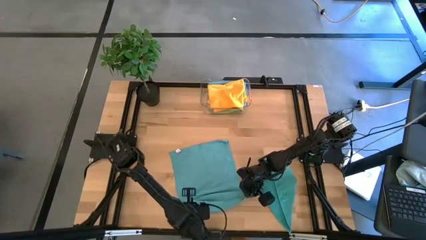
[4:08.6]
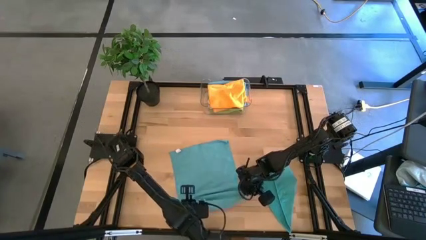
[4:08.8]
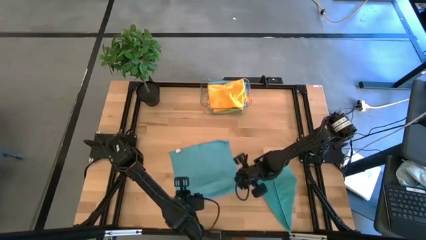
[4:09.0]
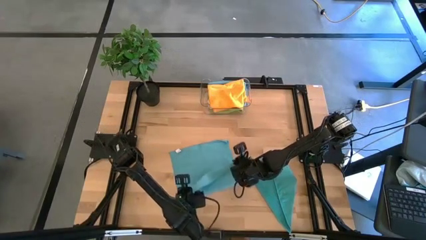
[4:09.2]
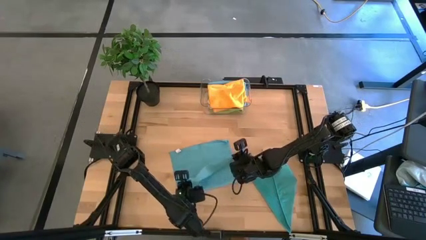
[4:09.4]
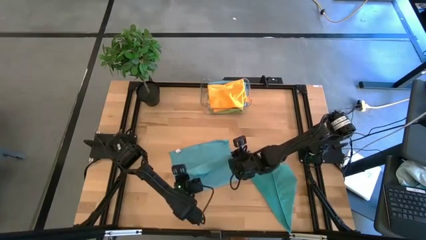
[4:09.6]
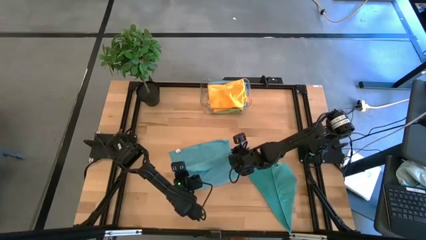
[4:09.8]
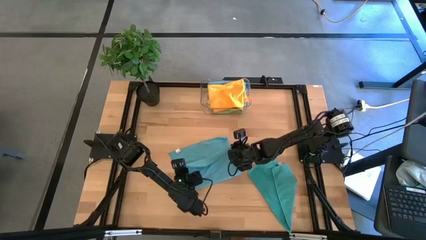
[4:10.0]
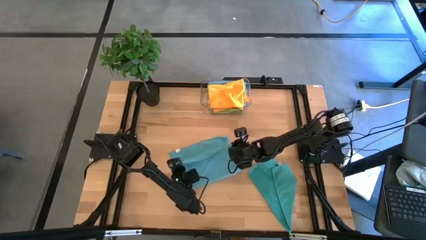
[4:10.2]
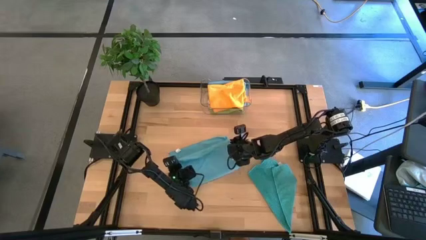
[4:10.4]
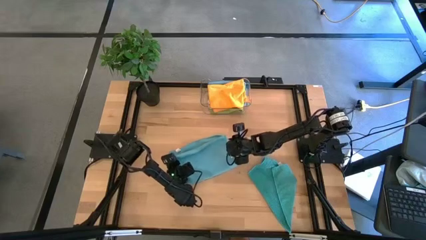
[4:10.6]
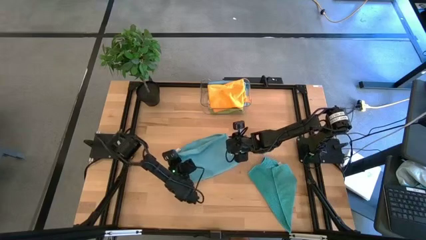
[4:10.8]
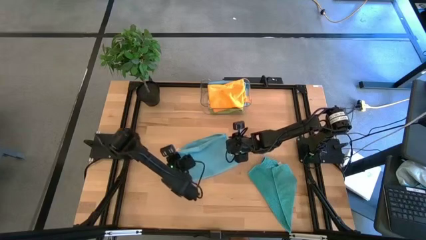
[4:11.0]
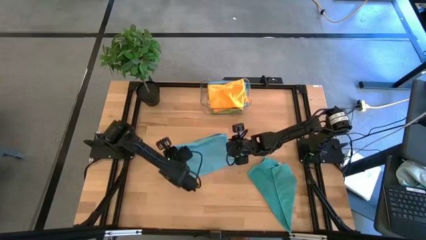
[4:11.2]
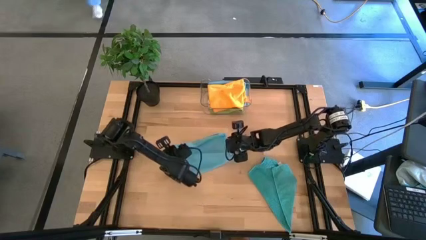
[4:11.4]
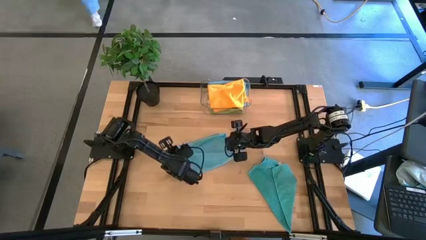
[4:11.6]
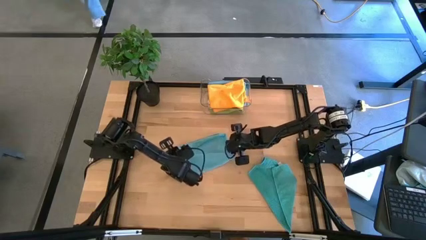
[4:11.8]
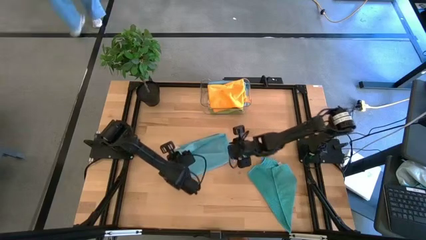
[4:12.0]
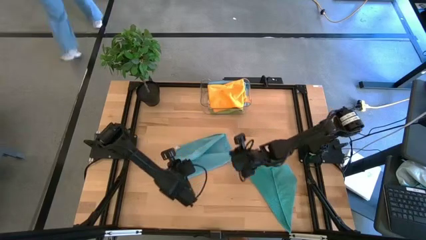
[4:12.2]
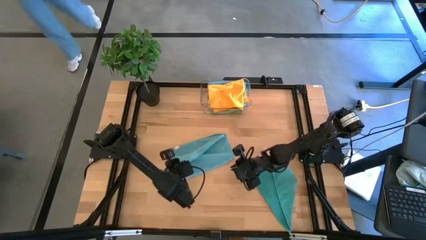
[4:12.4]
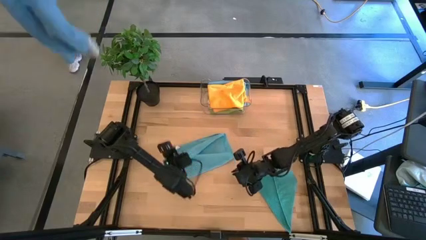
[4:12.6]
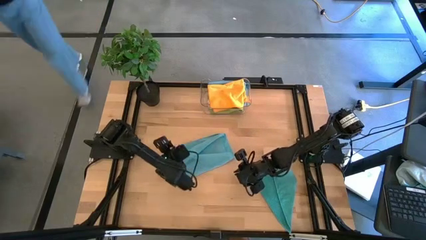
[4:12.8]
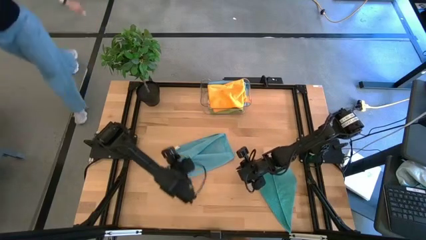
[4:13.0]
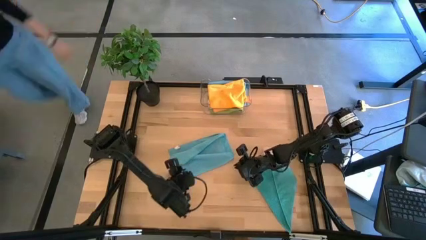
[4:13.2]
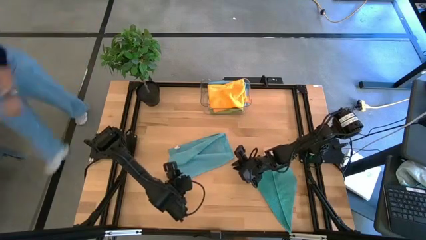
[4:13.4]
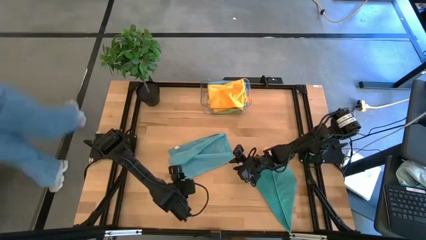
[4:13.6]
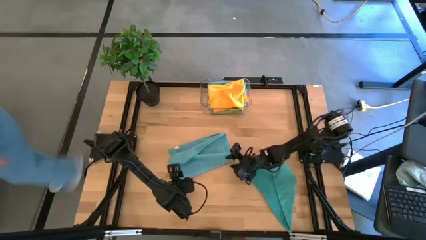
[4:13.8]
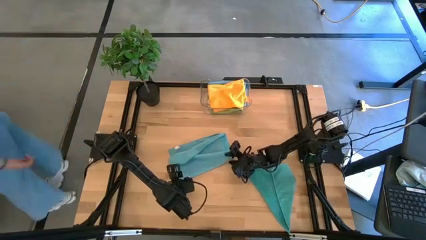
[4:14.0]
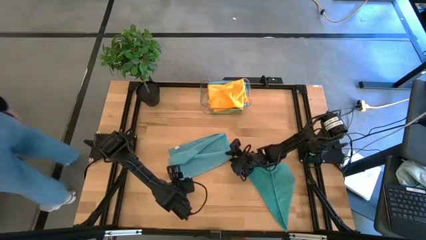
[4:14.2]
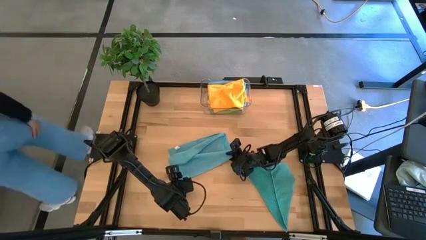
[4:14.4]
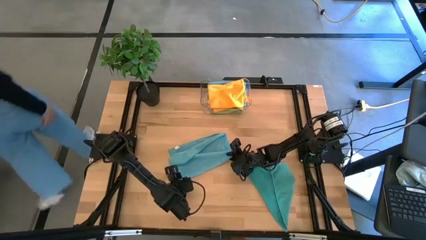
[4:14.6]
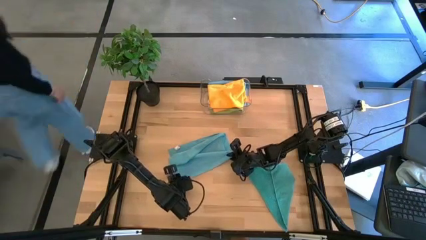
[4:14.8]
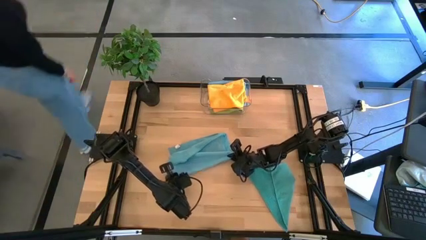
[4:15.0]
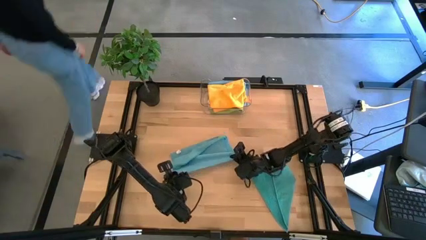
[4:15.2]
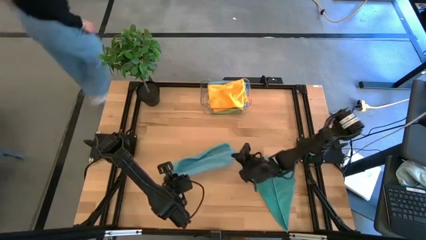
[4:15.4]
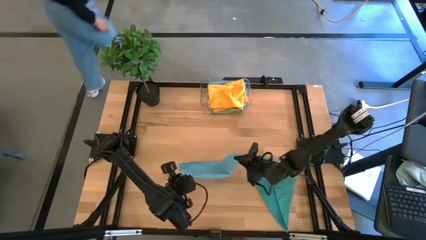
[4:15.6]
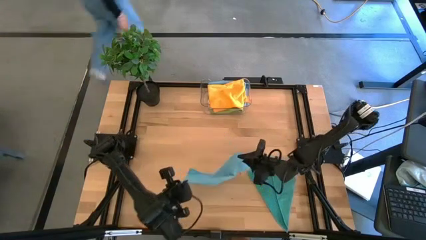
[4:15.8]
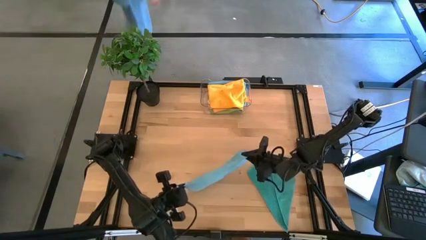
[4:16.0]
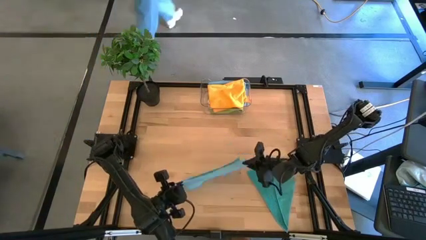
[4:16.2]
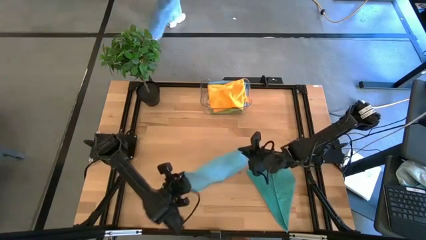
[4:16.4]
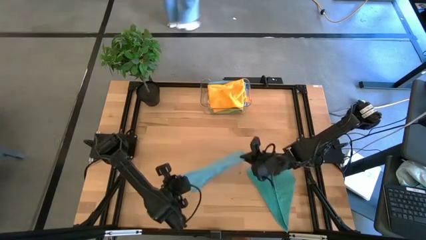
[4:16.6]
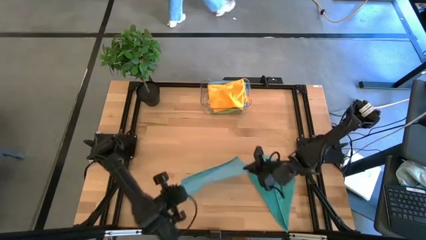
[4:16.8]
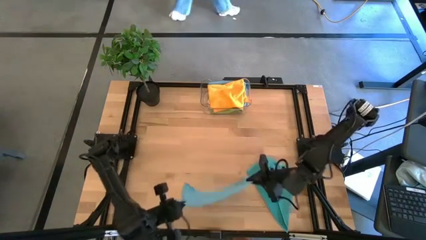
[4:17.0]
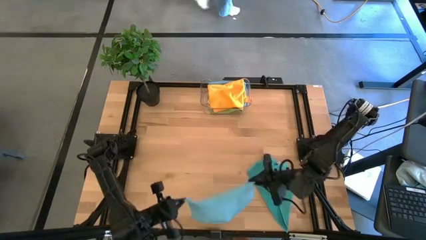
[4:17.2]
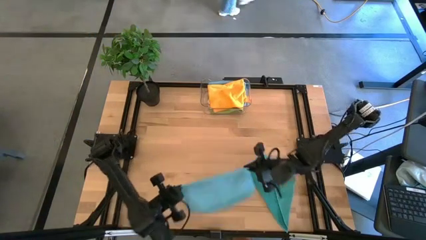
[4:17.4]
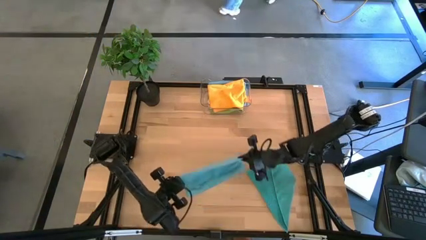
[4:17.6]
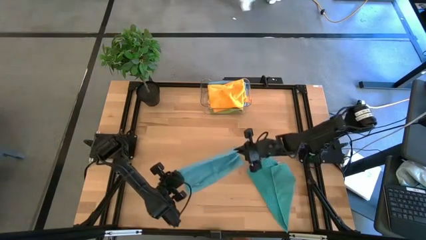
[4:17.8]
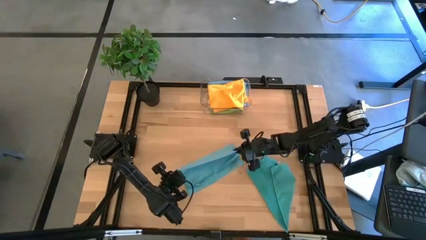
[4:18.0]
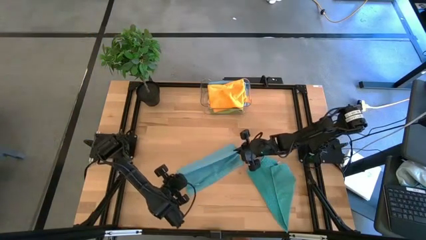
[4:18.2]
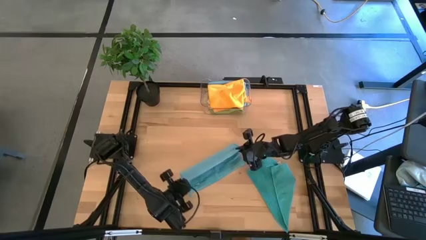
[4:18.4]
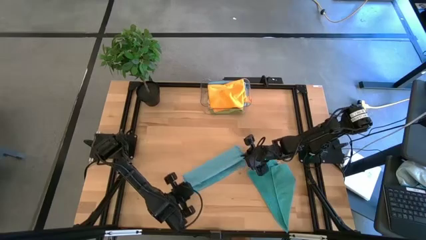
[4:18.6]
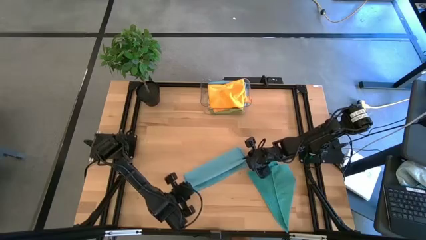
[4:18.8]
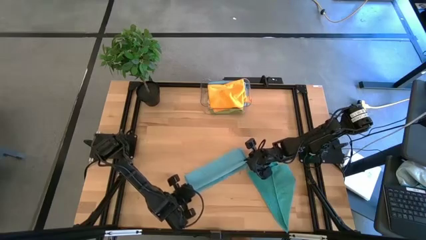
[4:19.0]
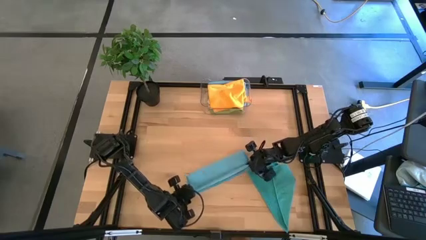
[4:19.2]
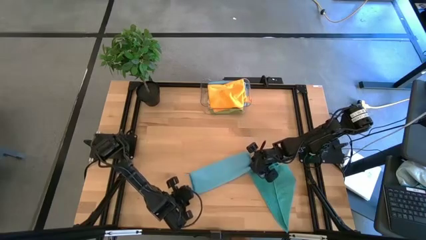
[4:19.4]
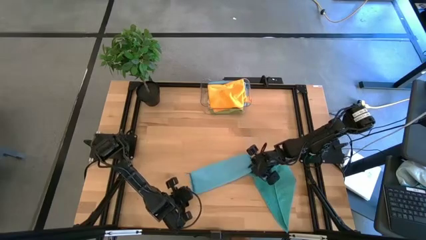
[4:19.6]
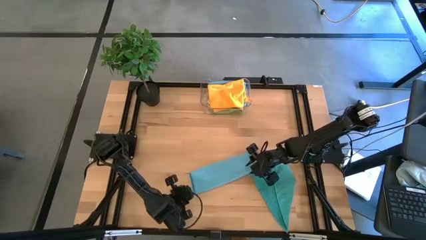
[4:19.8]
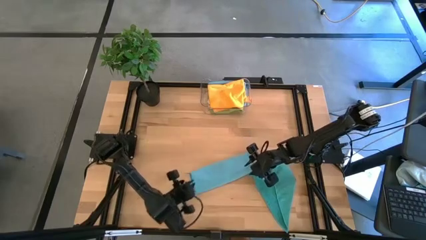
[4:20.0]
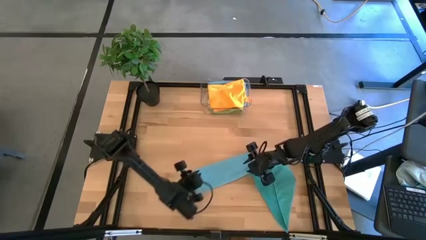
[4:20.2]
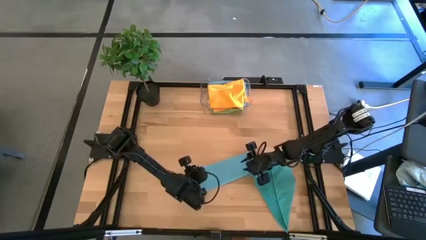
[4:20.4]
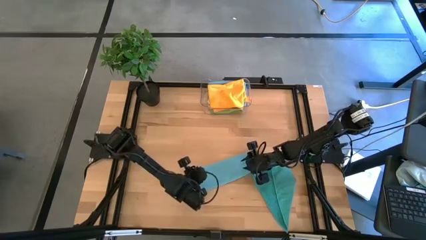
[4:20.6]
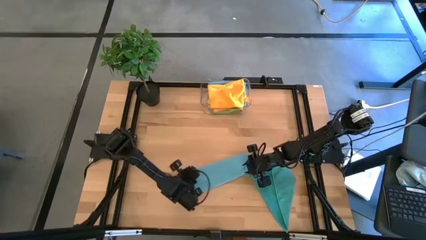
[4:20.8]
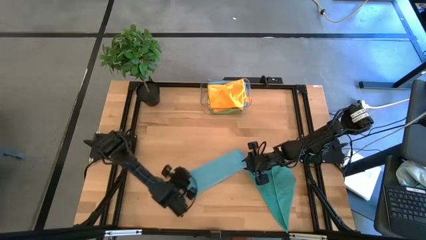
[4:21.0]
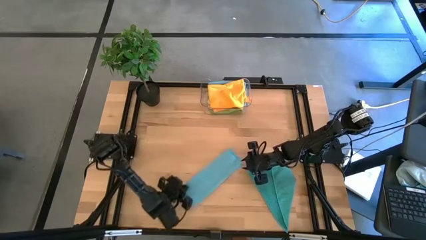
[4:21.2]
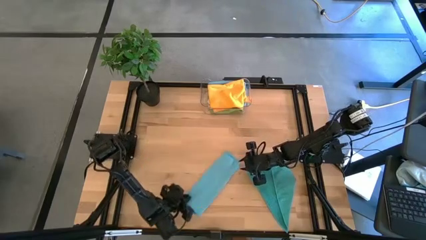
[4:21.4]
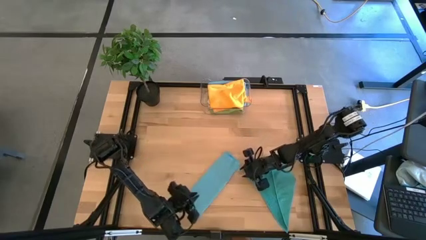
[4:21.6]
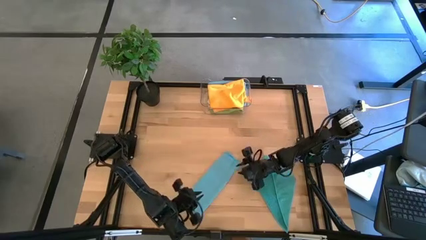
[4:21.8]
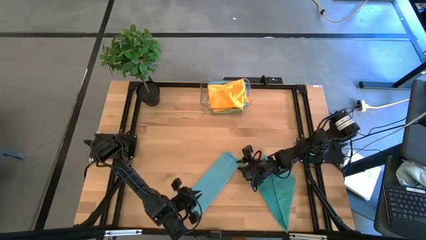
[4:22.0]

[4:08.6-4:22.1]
Task: Fold microfiber towels
Fold the top blue microfiber towel
